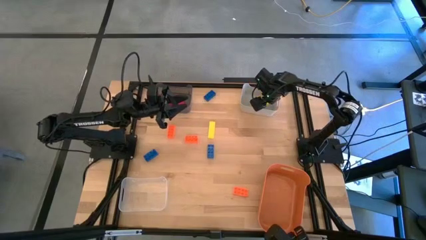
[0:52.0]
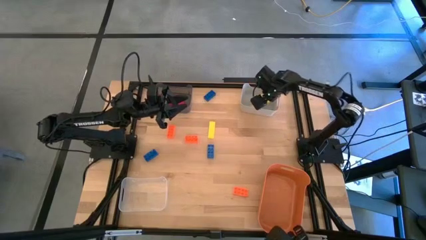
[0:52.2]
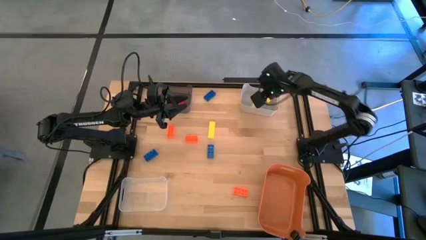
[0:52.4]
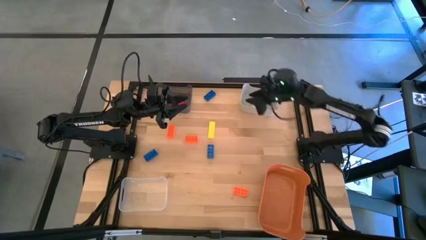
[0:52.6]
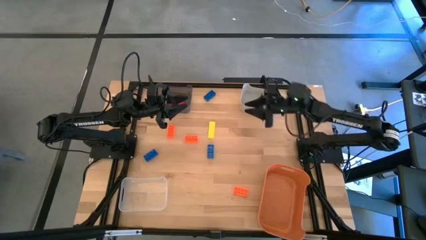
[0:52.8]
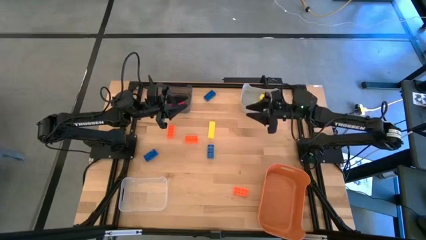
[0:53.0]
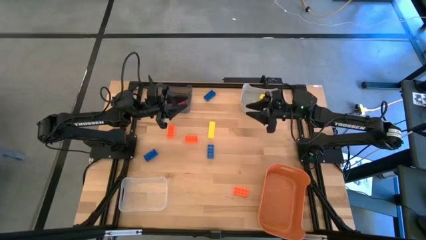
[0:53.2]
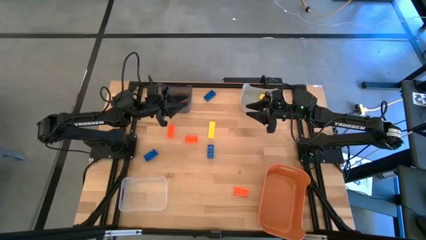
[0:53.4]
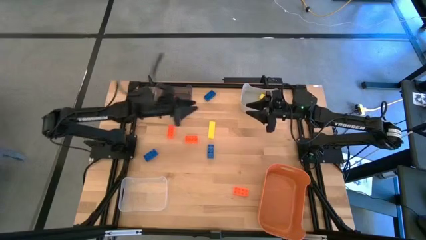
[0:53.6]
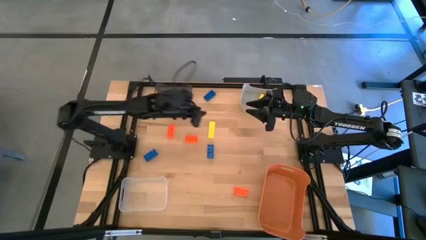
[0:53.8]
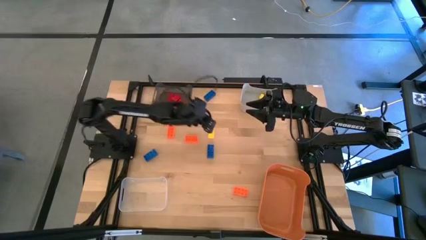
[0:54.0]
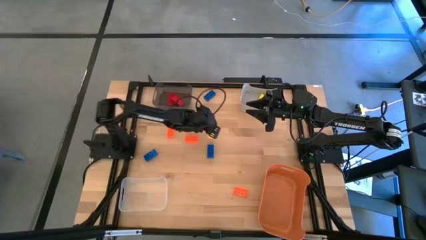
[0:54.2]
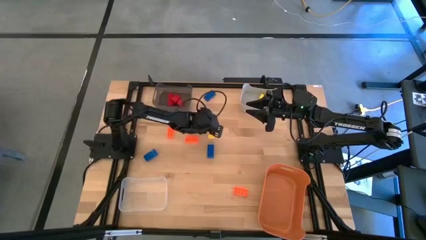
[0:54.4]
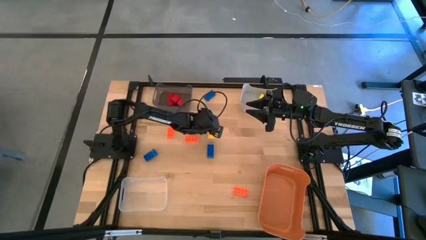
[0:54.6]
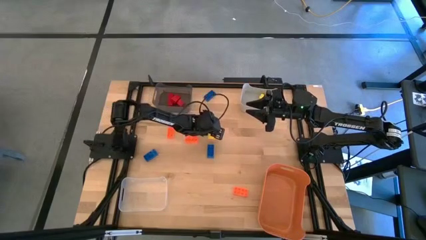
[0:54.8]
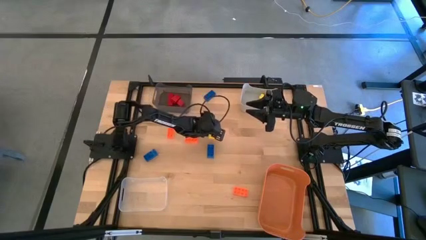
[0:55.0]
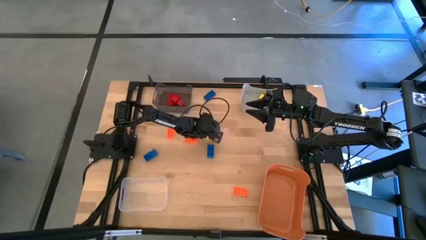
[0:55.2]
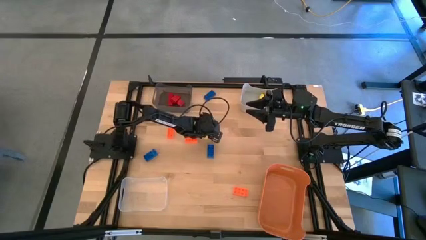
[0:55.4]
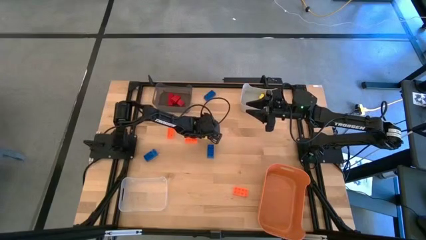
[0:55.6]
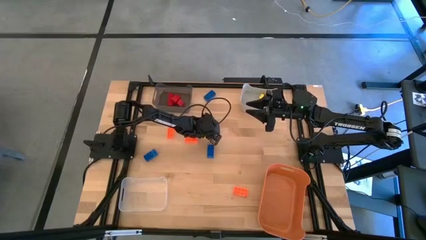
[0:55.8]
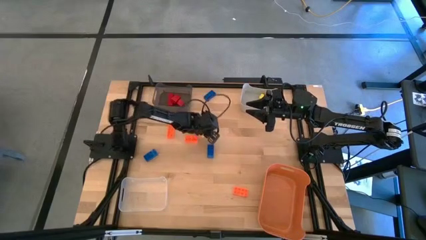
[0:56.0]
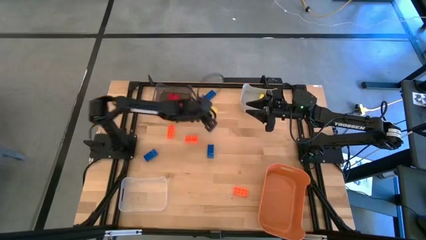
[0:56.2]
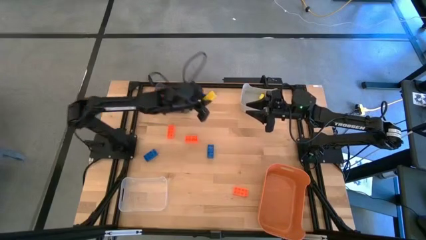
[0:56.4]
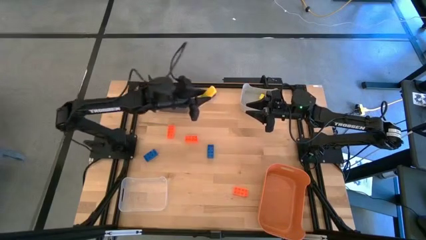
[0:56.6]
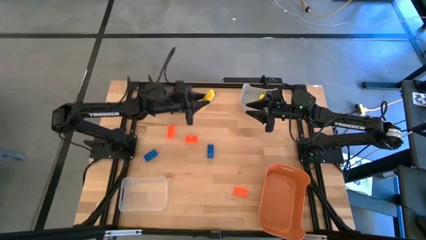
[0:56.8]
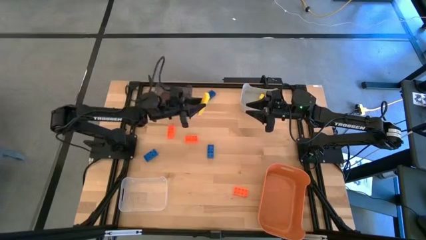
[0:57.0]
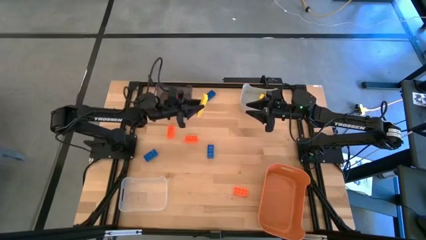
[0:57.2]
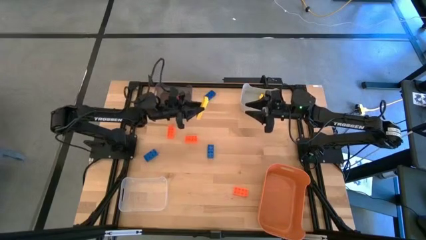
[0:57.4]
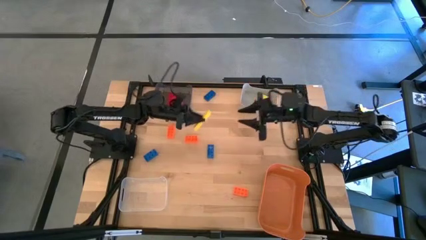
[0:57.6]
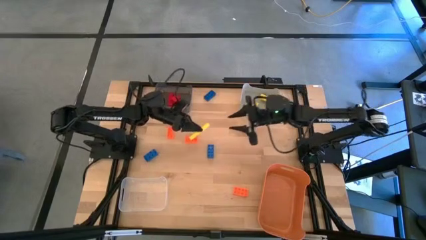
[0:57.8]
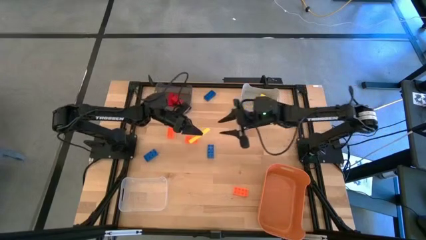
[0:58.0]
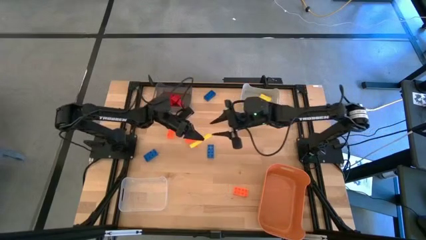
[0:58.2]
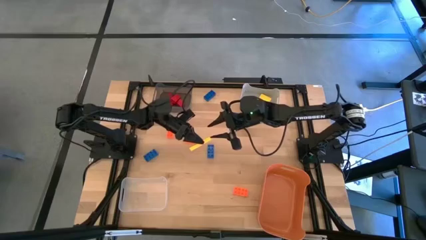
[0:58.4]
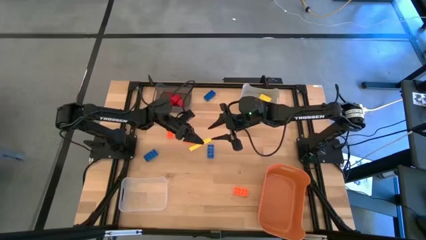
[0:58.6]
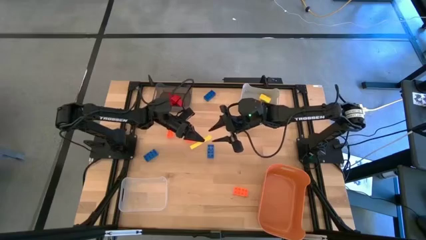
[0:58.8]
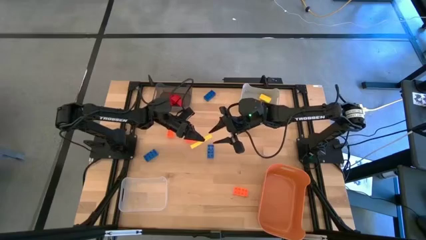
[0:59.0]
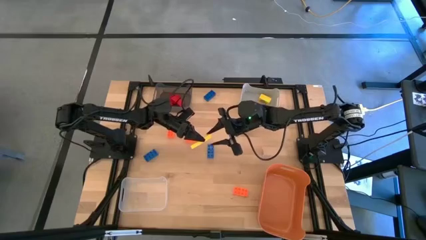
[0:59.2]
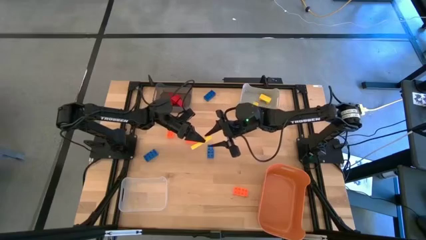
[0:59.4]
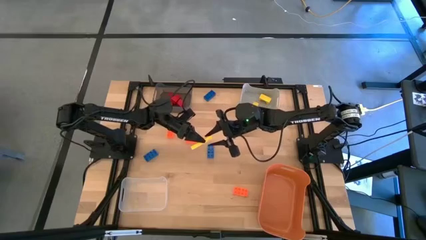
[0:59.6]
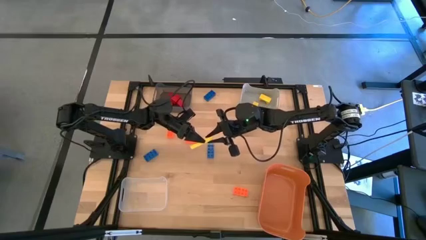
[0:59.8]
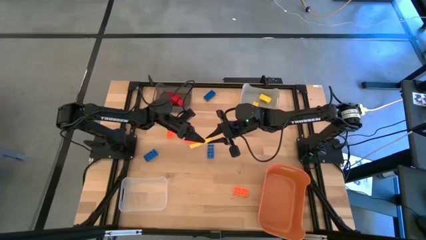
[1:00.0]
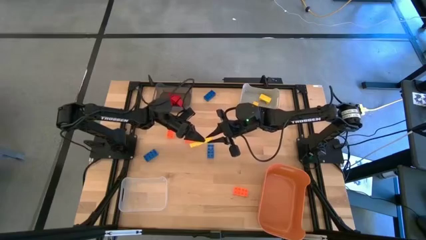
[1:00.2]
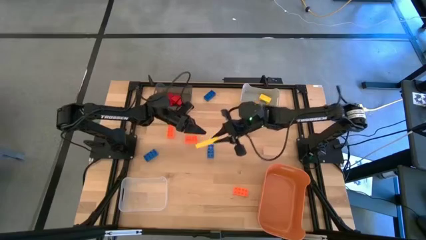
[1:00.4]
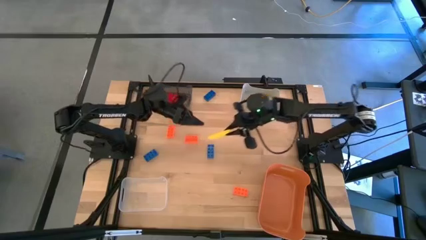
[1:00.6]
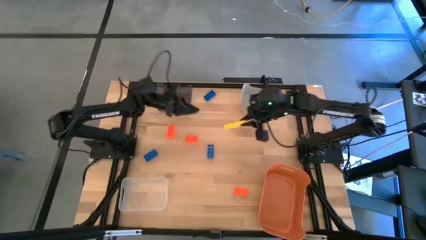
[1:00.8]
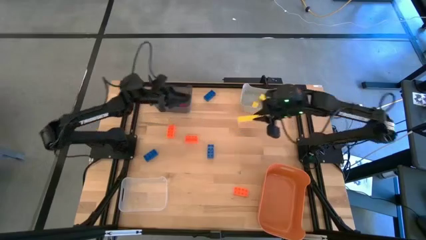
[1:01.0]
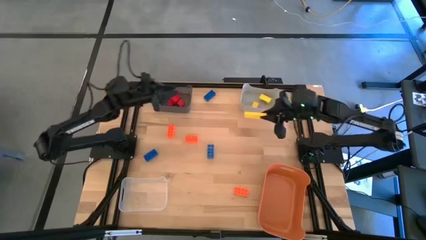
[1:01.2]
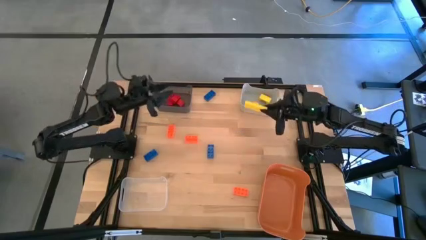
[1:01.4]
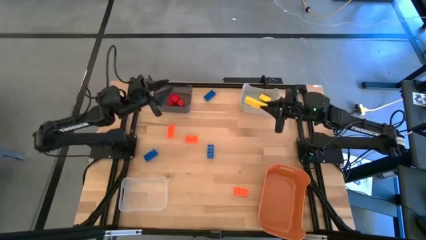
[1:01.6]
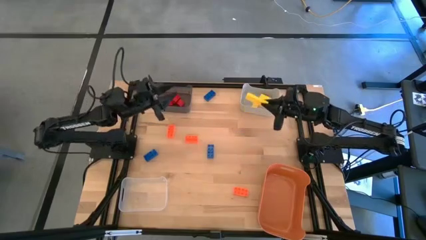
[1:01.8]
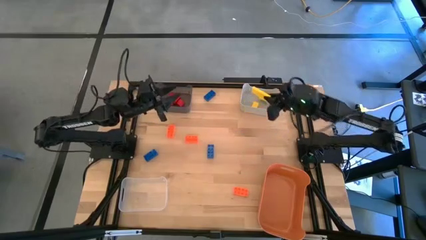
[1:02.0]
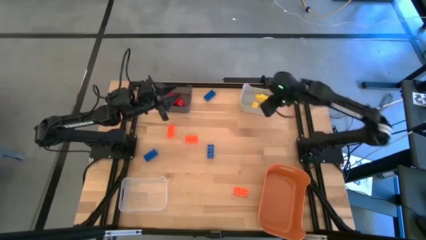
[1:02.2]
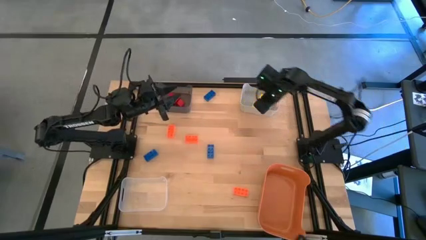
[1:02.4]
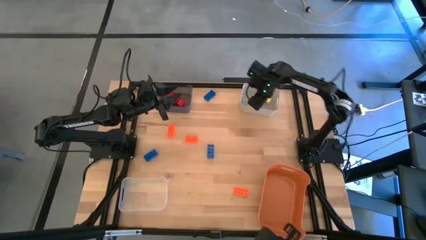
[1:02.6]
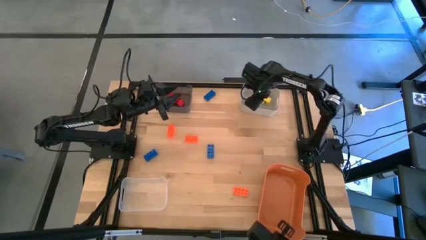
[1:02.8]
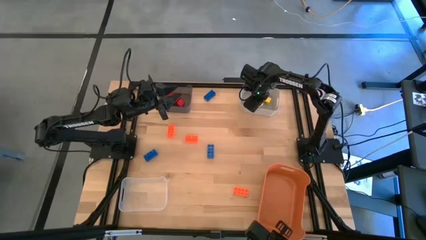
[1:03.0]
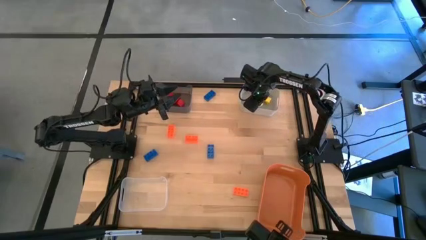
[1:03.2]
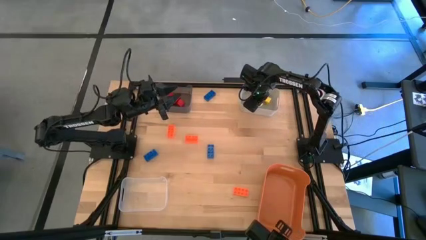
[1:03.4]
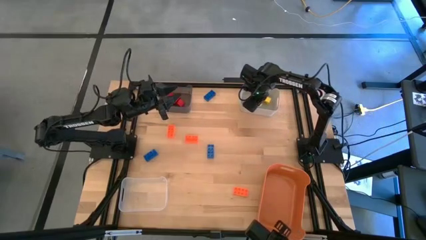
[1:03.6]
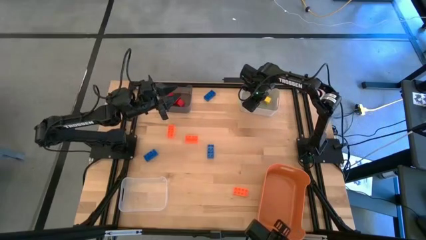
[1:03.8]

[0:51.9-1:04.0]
Task: Sort & place blocks by color
Put the yellow block into the gray bin
